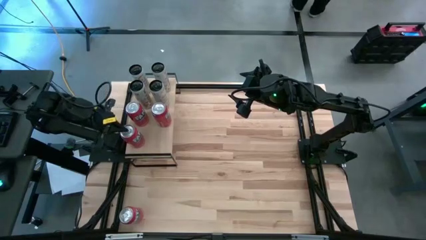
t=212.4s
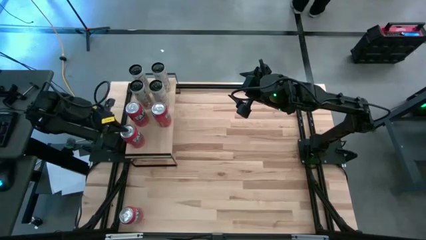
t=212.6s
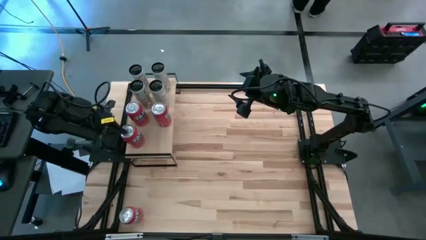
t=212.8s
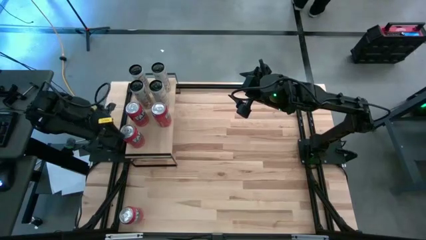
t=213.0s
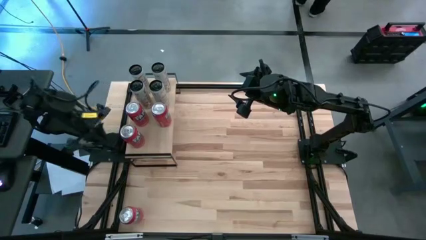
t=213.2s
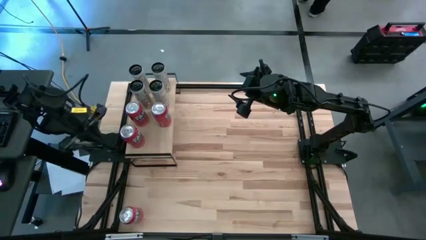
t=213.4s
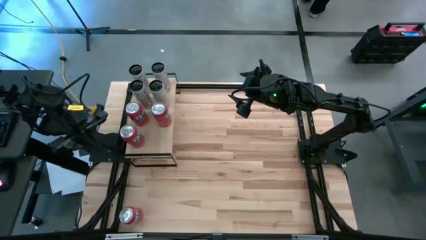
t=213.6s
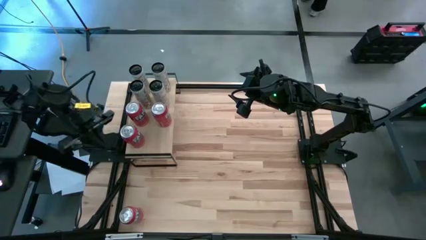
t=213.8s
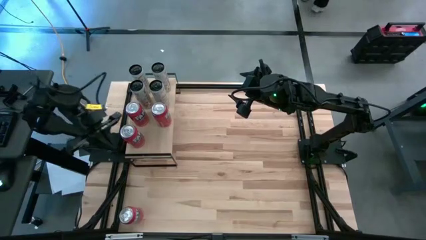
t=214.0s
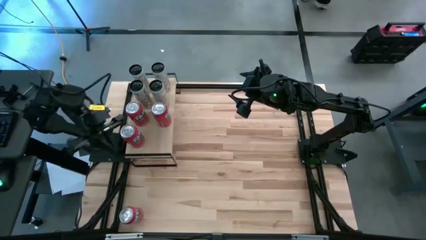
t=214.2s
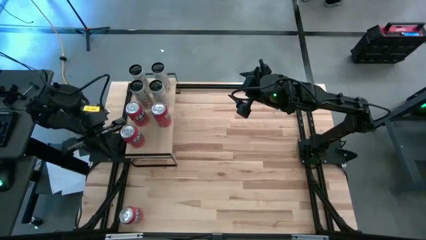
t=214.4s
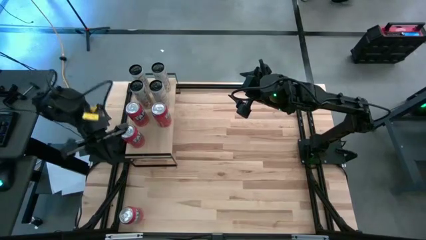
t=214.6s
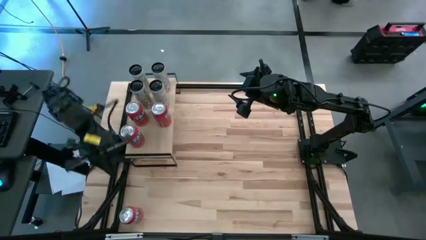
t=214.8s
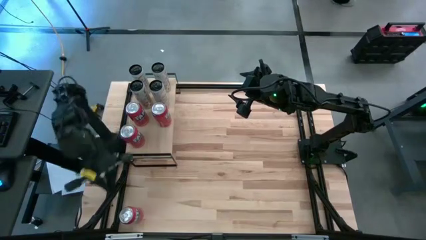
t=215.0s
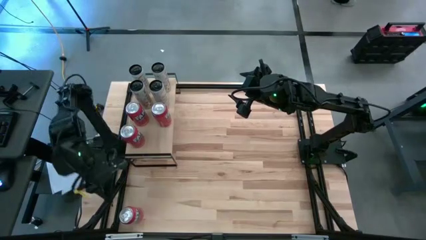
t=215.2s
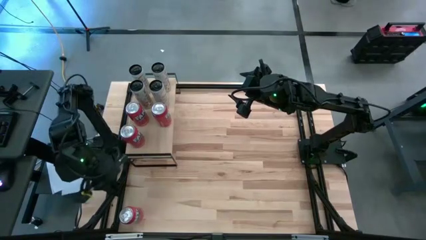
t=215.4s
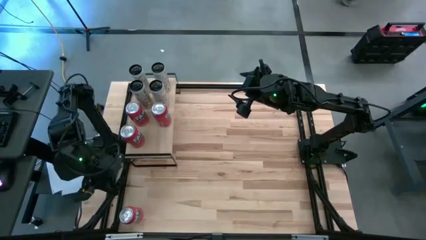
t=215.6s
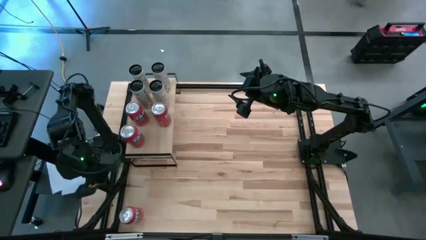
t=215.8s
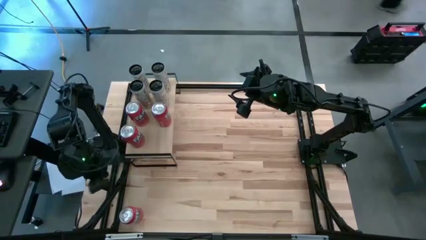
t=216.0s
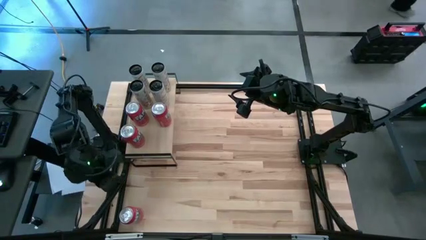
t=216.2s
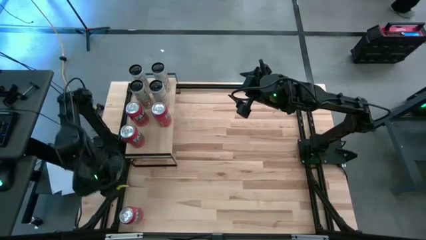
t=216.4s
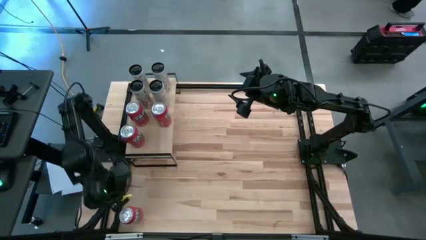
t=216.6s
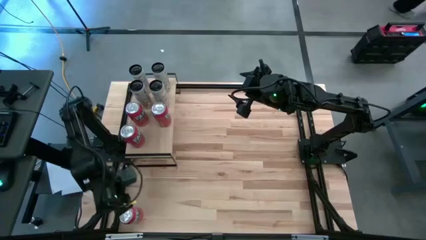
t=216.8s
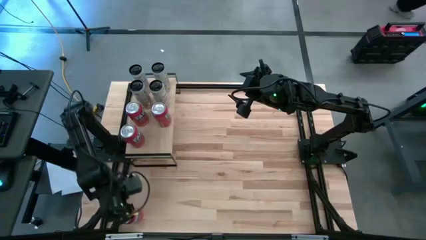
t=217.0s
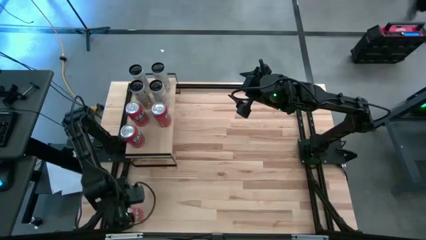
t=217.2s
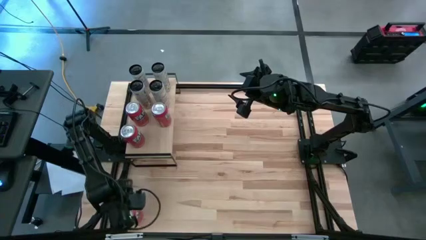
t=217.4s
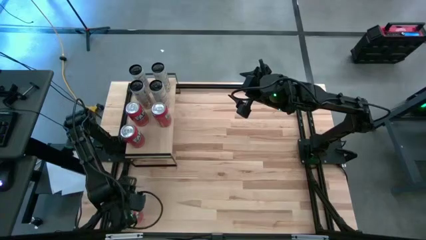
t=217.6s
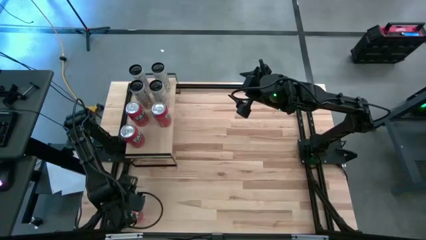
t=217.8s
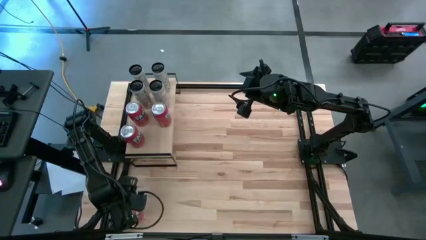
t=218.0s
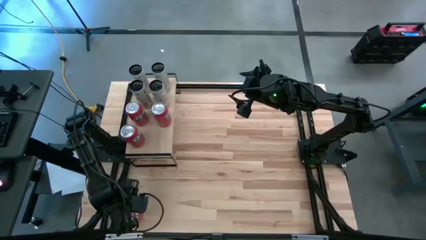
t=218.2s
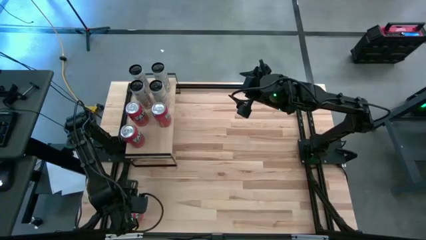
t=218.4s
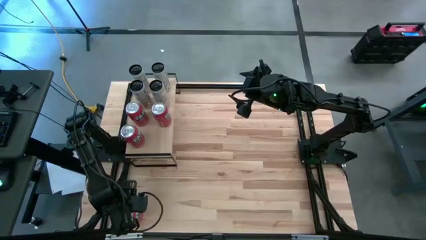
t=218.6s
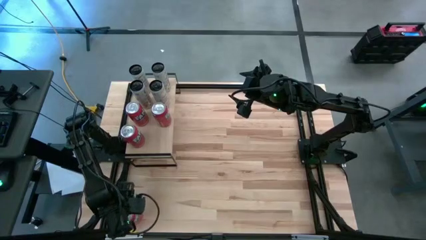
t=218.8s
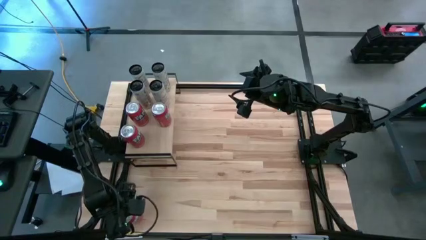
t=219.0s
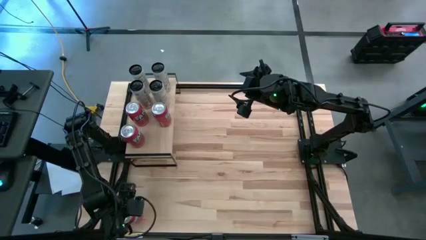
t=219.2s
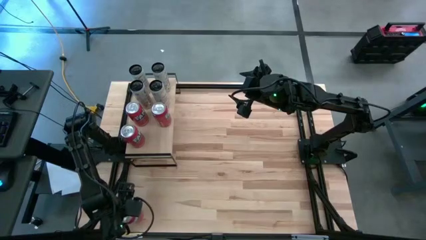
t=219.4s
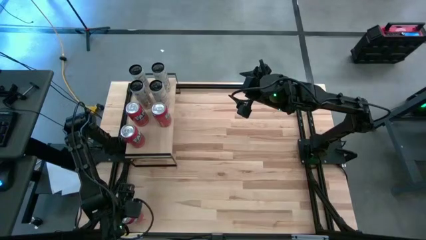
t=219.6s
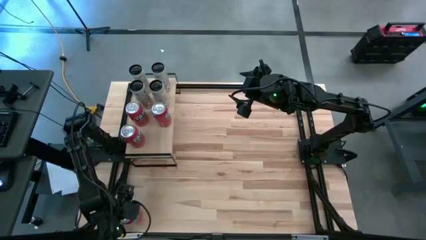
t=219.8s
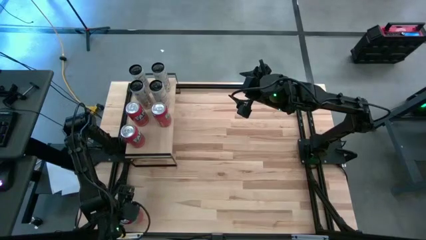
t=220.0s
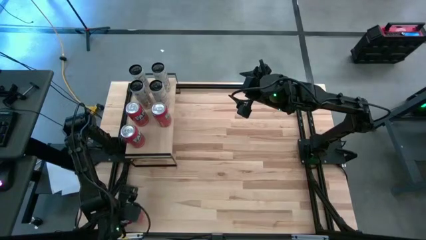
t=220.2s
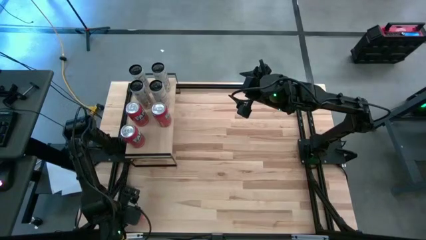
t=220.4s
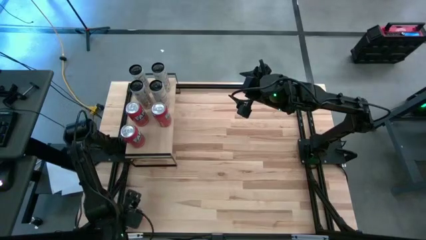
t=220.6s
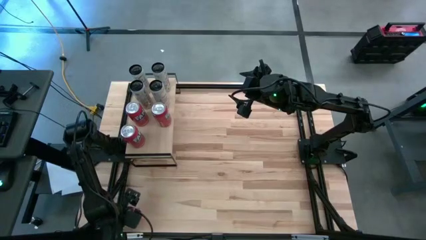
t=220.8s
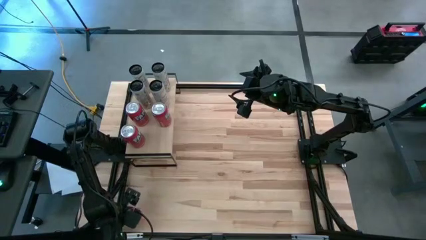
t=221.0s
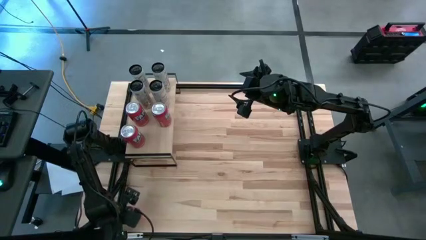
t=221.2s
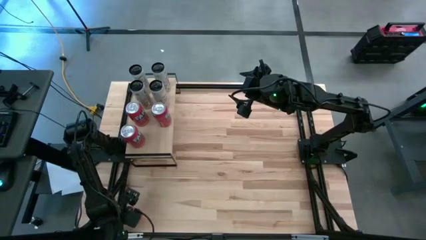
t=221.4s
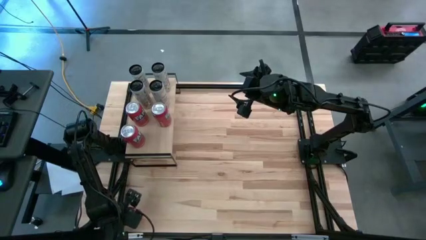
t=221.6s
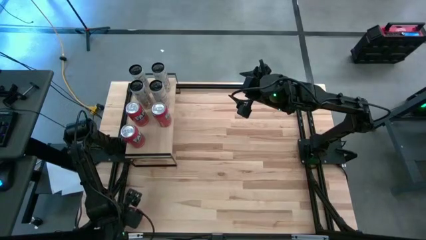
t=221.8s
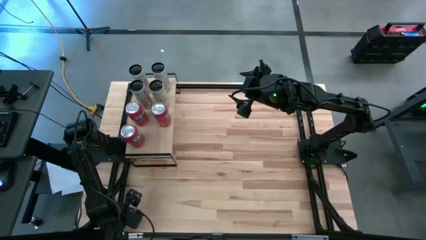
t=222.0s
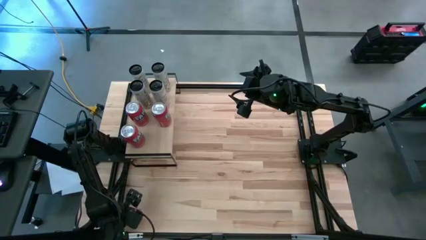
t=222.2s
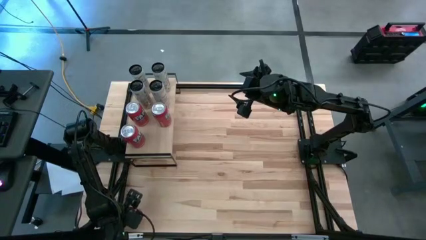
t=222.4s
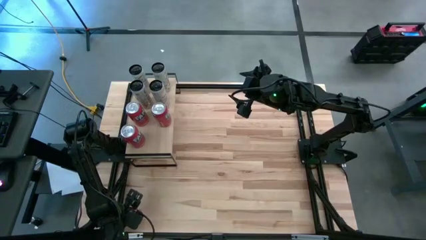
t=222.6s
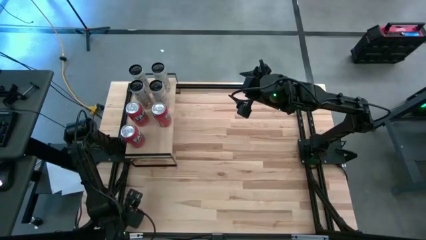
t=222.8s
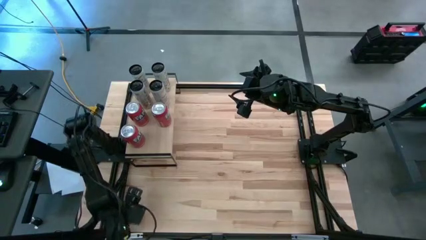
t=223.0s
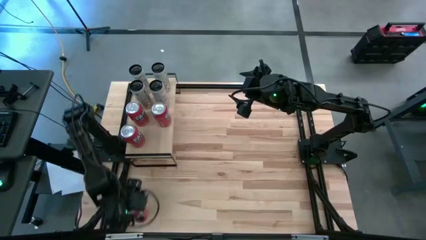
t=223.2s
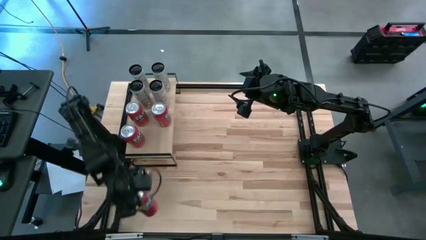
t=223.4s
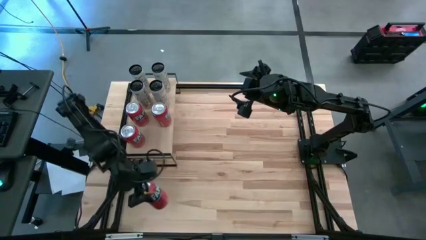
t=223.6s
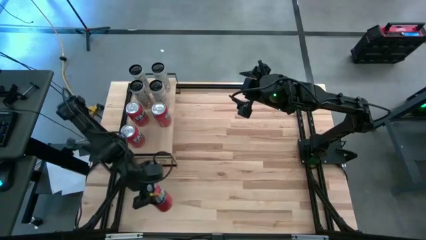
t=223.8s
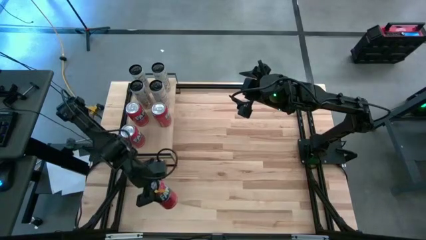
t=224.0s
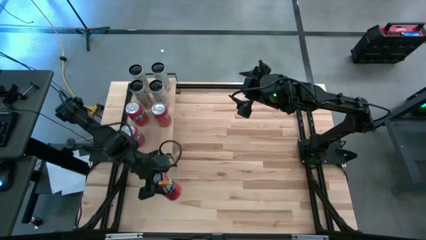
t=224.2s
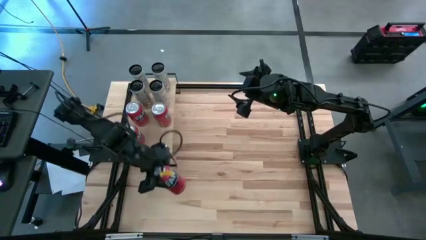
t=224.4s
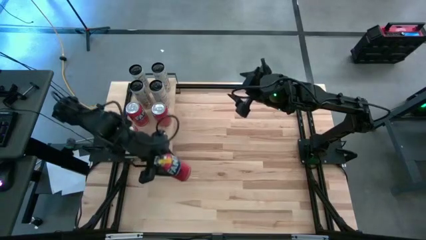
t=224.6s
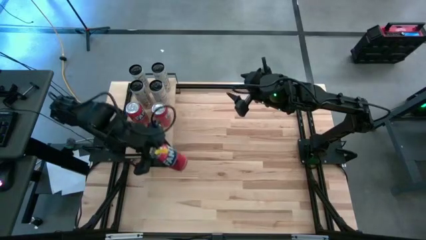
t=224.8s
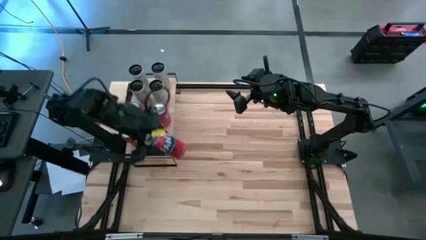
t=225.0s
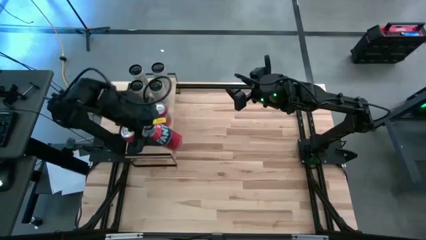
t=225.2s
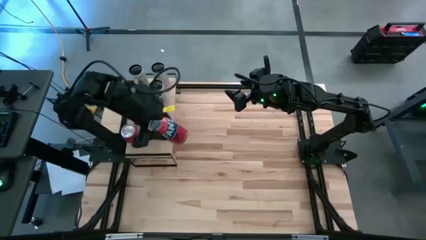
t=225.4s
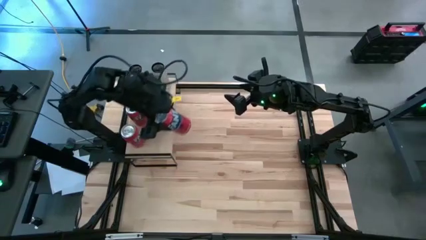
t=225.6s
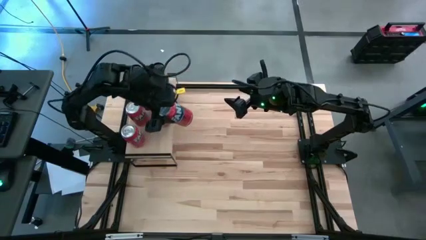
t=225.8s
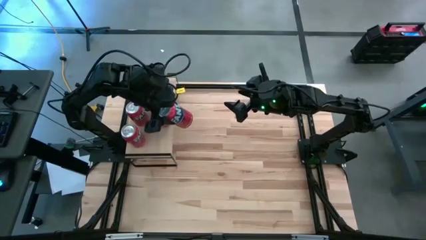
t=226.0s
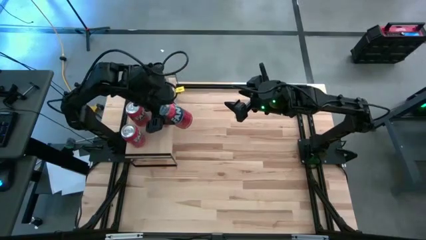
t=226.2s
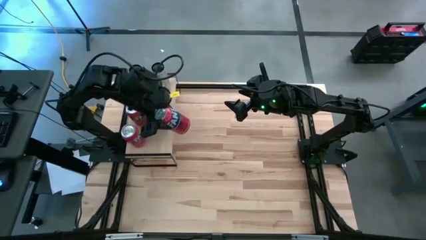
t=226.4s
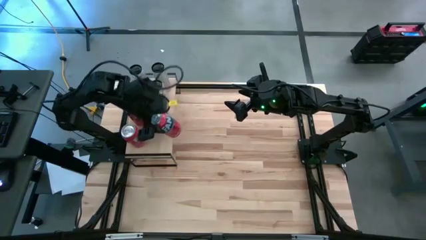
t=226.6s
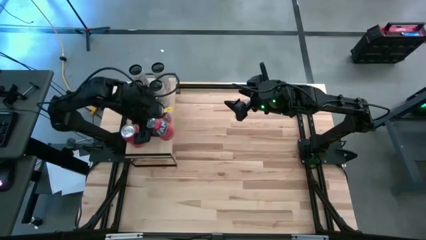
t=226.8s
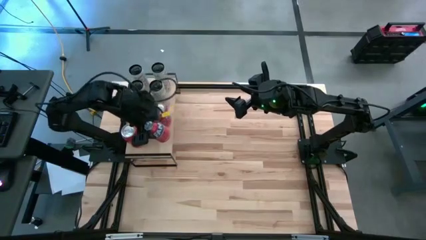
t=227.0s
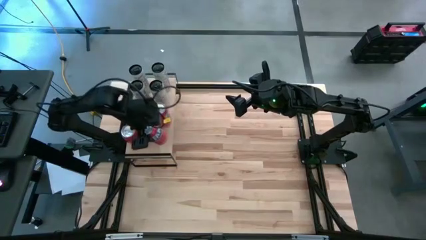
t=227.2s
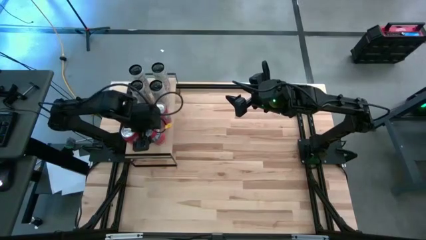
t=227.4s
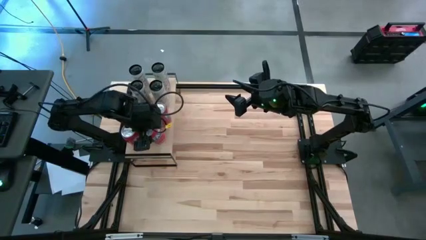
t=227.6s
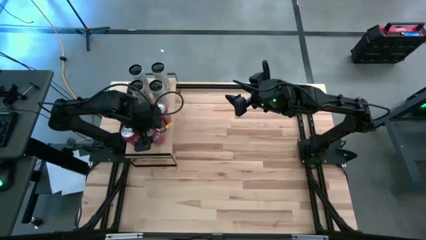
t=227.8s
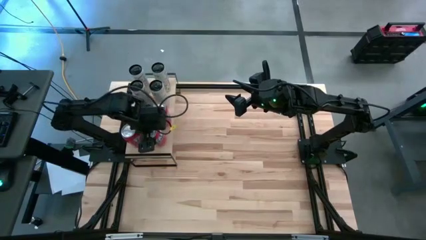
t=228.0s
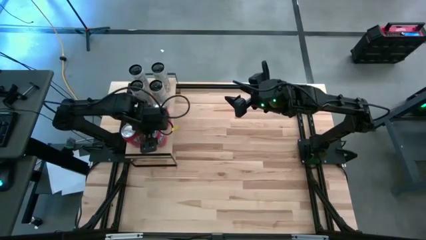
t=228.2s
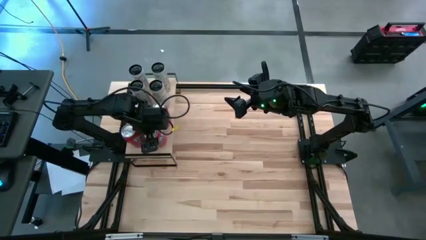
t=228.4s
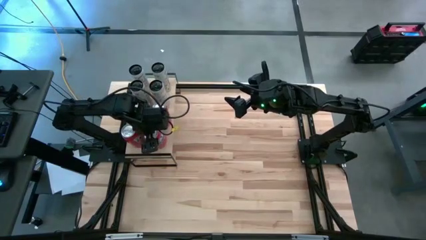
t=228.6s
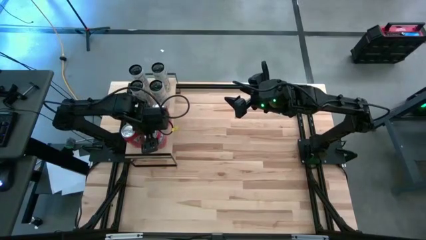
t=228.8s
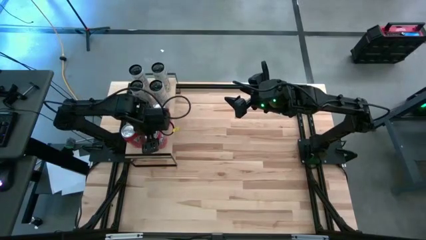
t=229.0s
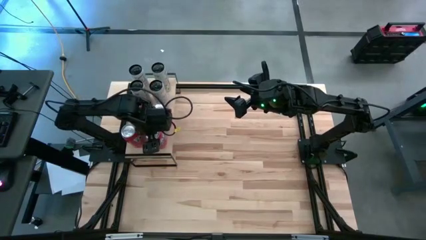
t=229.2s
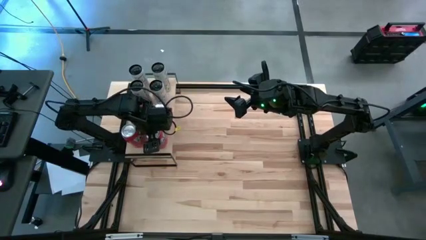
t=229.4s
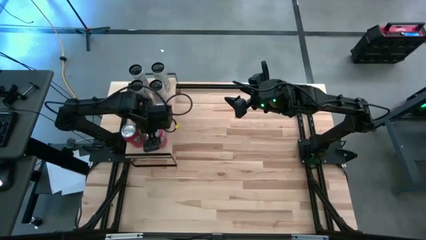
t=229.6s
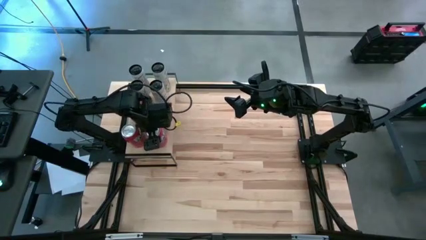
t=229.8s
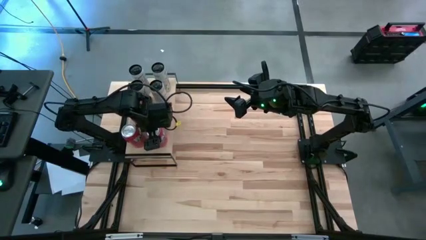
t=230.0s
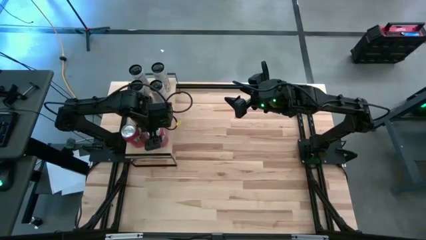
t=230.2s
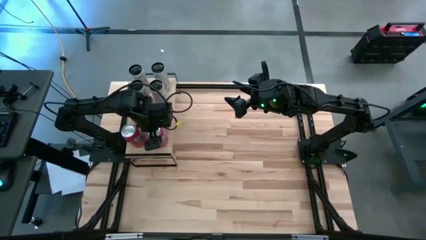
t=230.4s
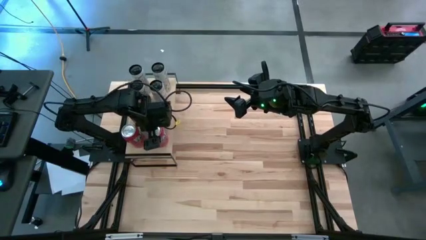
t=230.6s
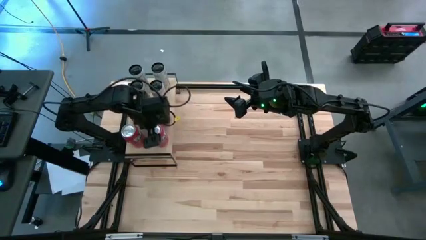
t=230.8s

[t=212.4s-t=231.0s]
Task: Place canned beverage on shelf
Put the red soda can on the shelf aligned with the other red soda can
